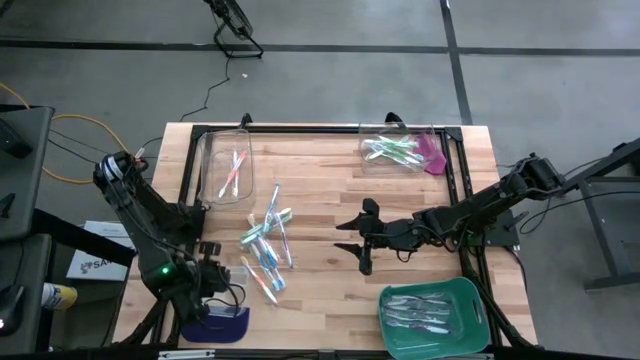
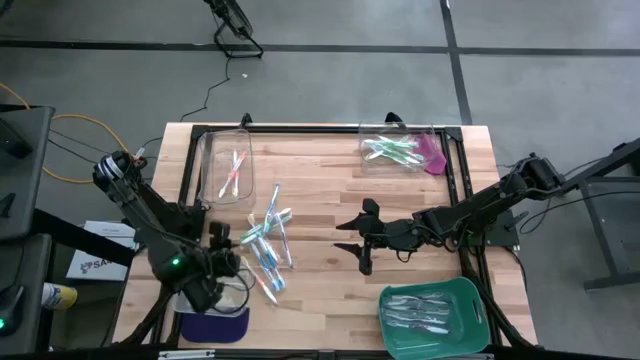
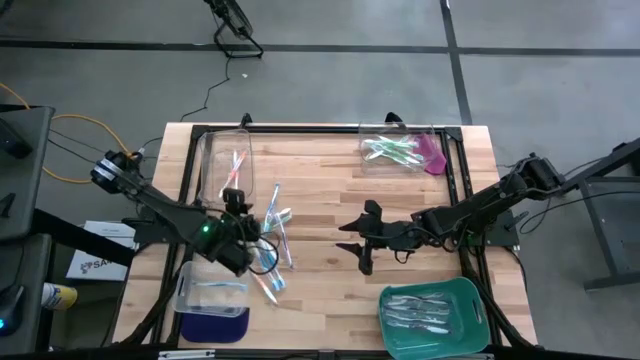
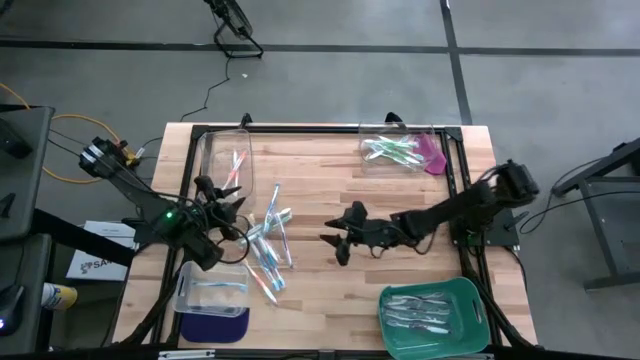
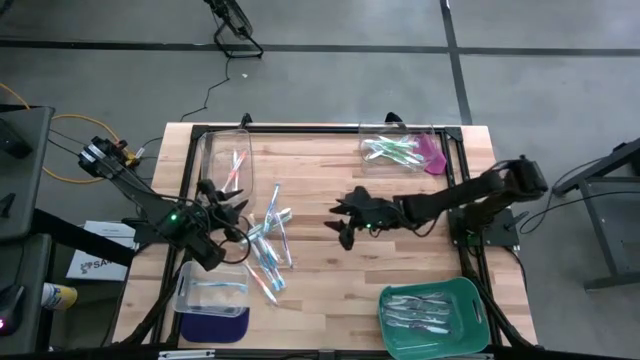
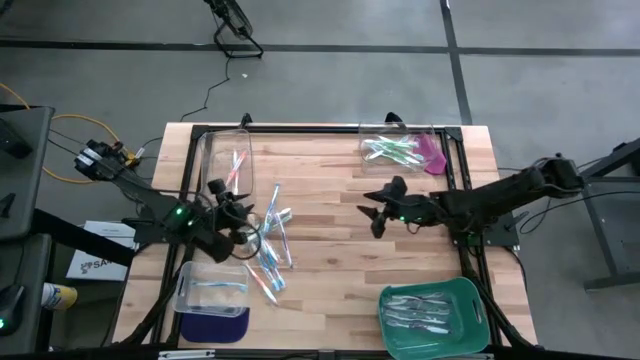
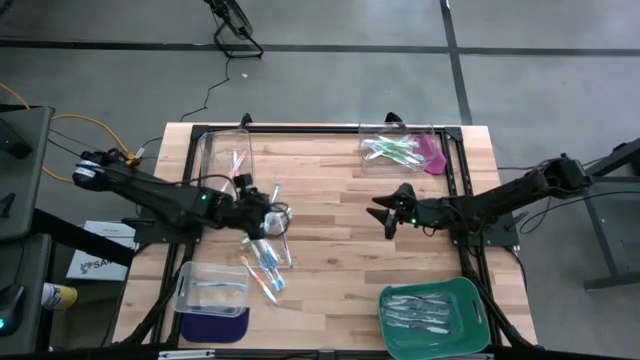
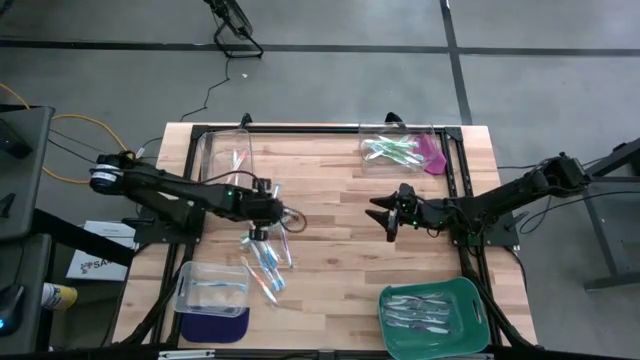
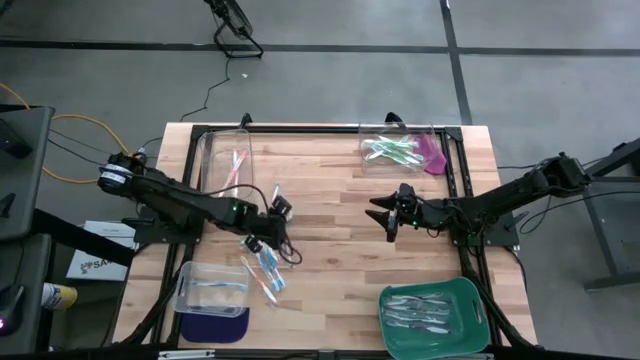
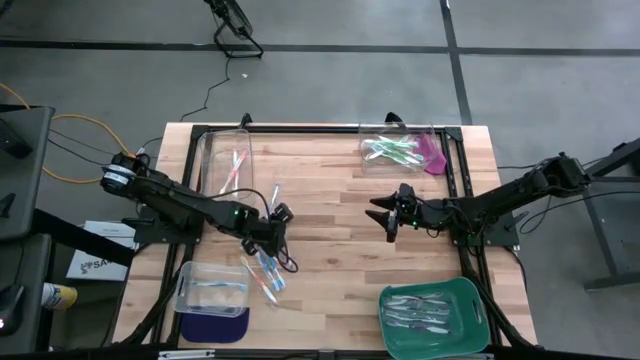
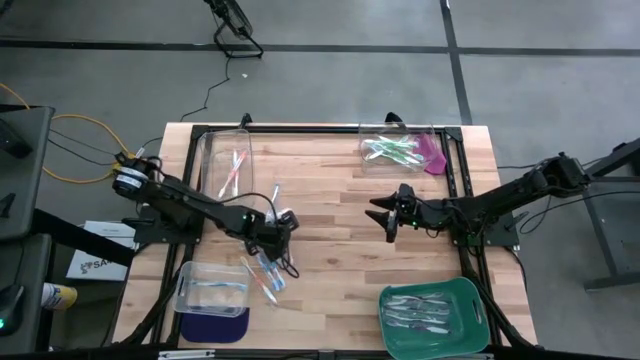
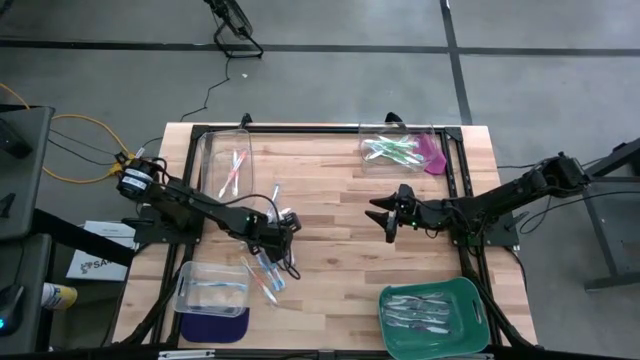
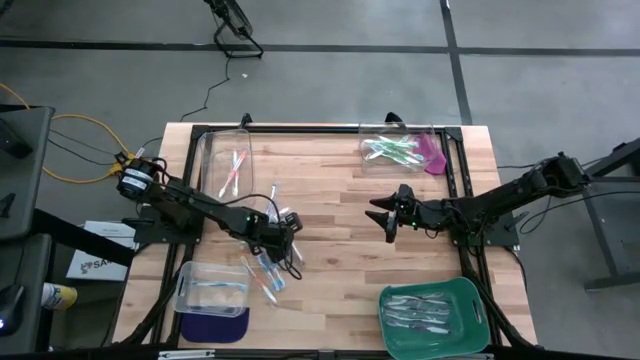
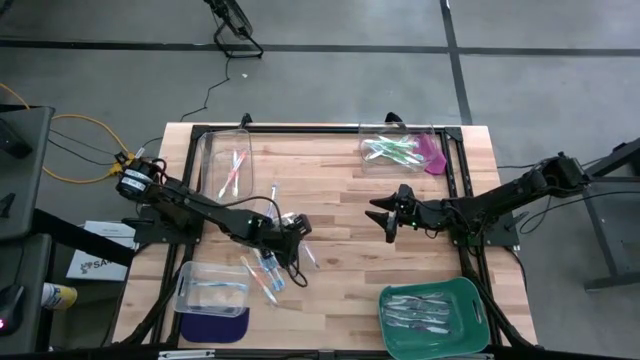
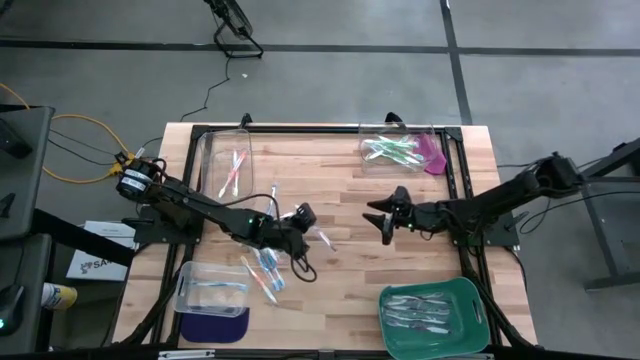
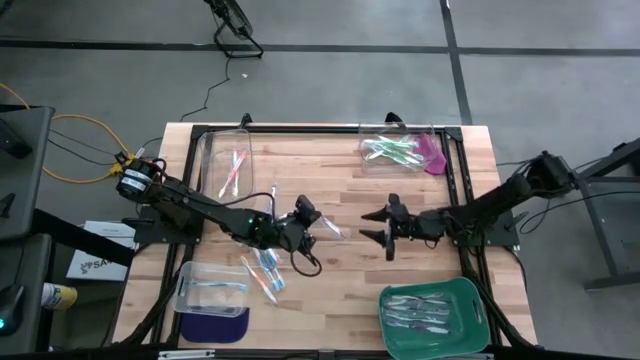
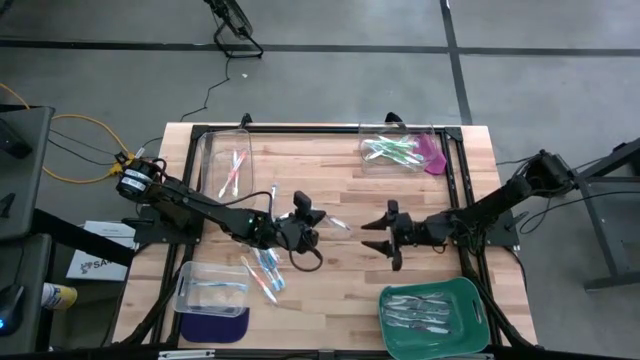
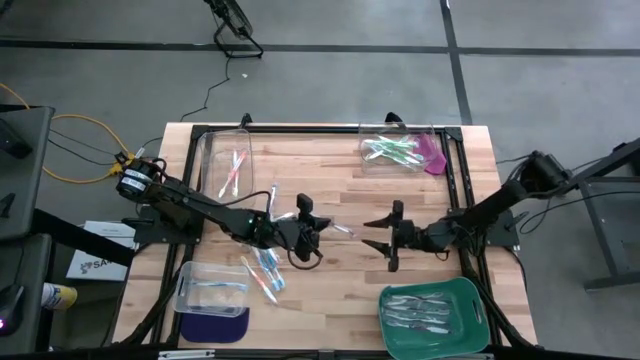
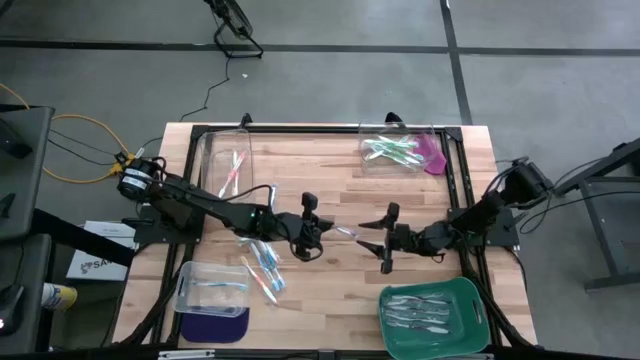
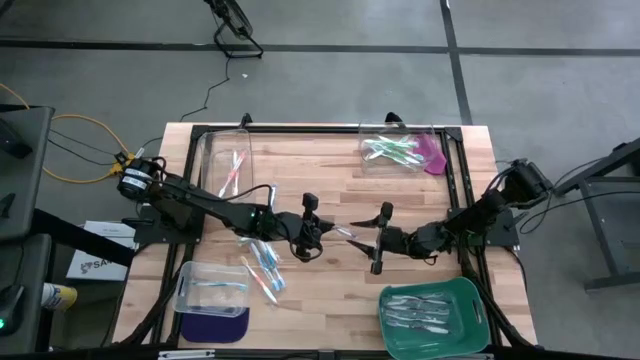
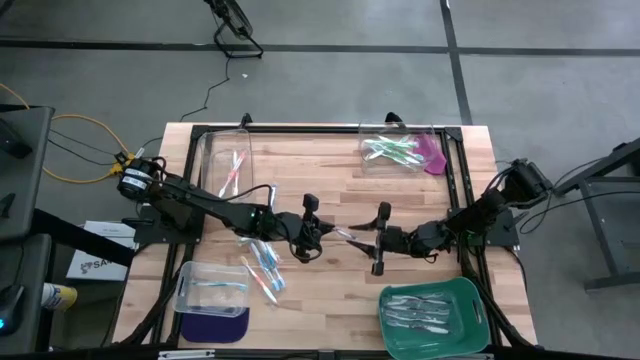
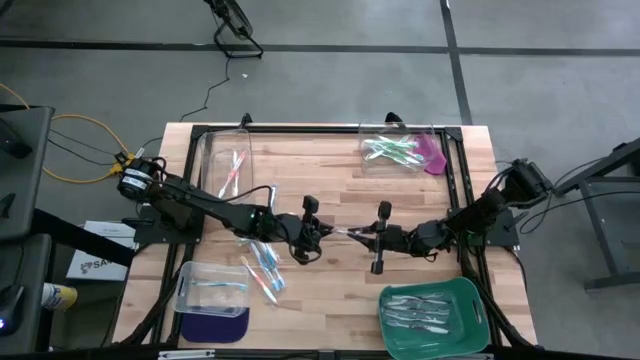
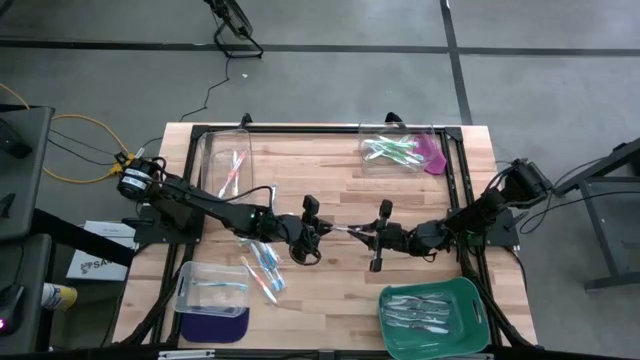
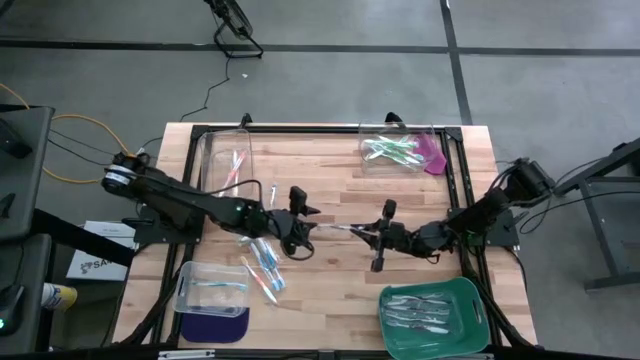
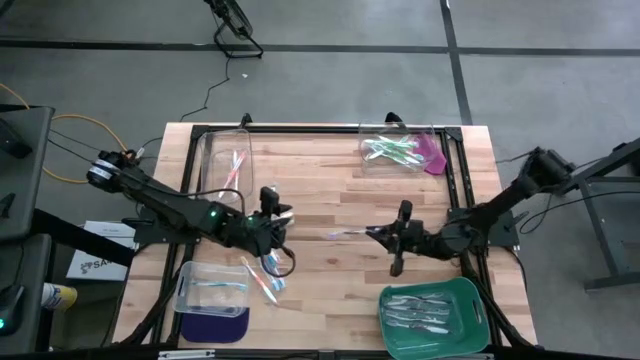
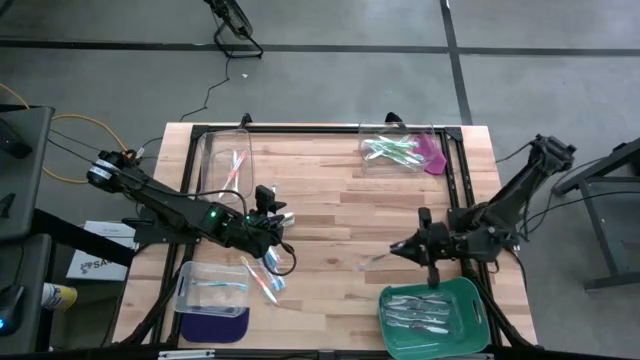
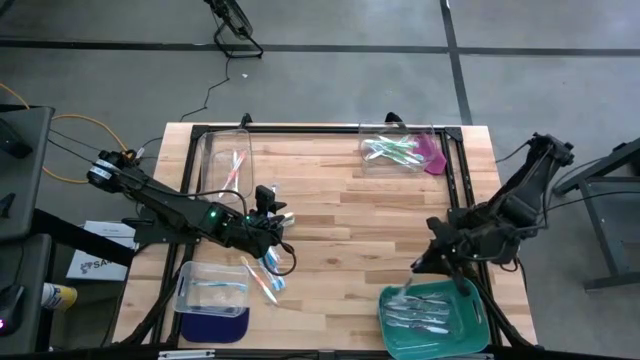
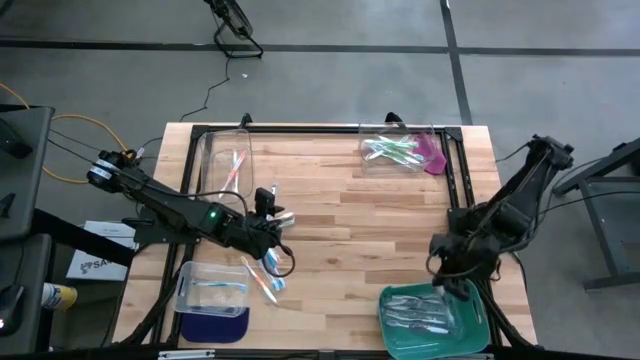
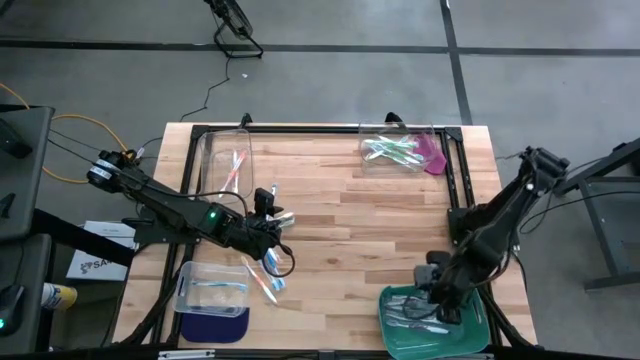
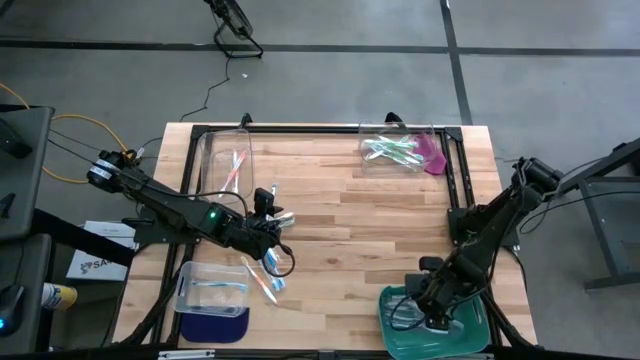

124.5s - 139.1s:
Task: Pick & Place Toothbrushes
Put the violet toothbrush into the green bin

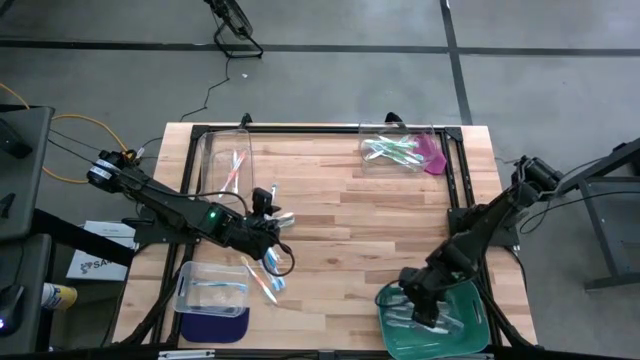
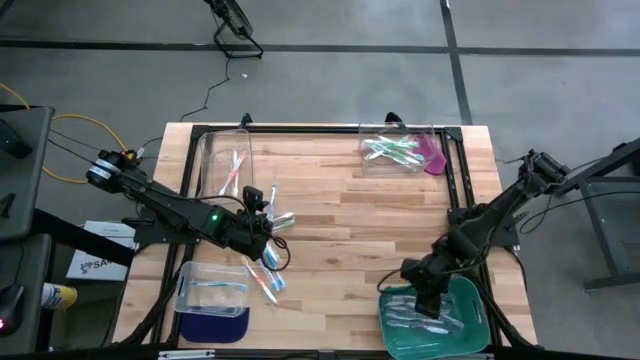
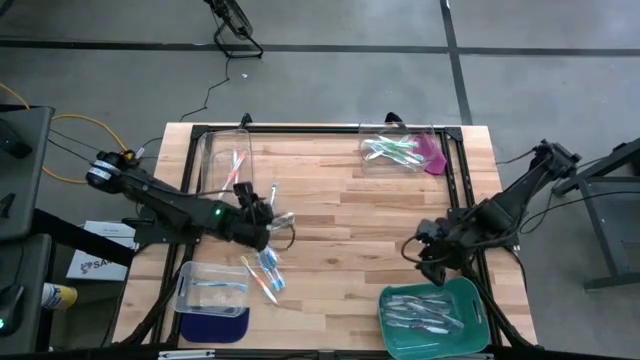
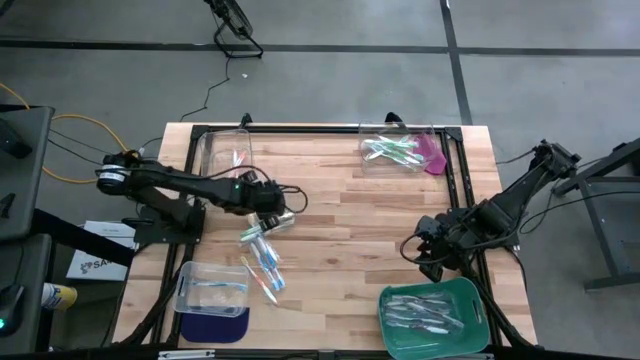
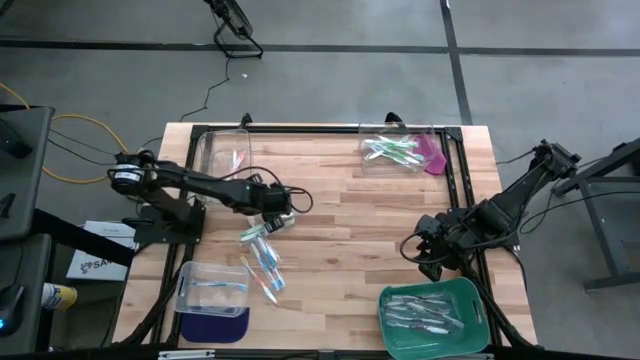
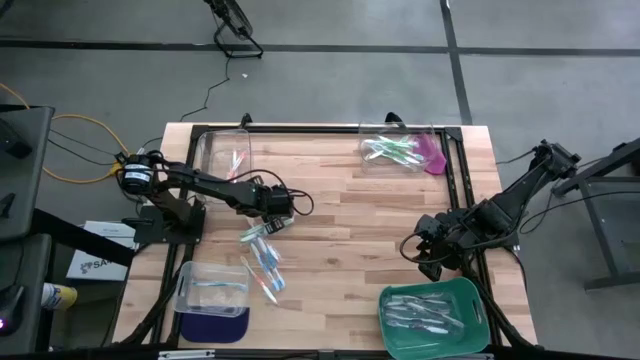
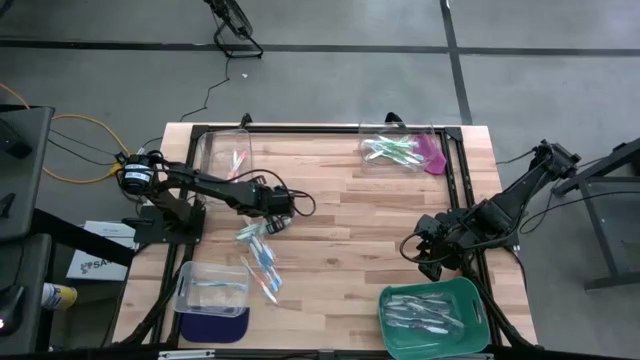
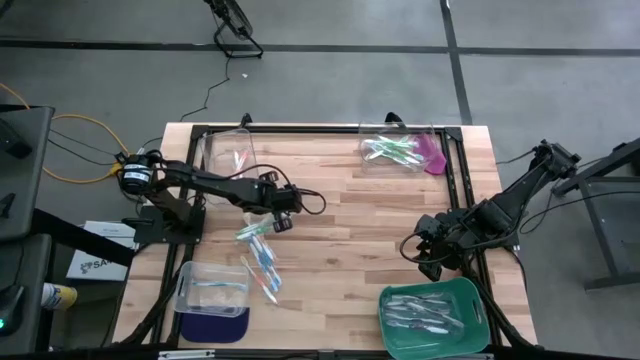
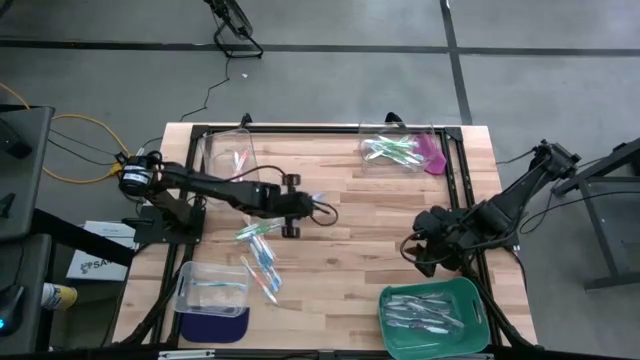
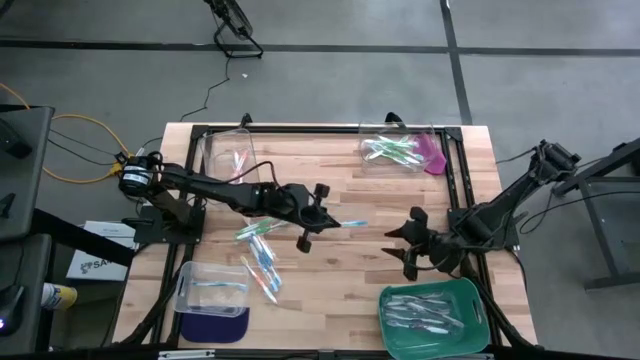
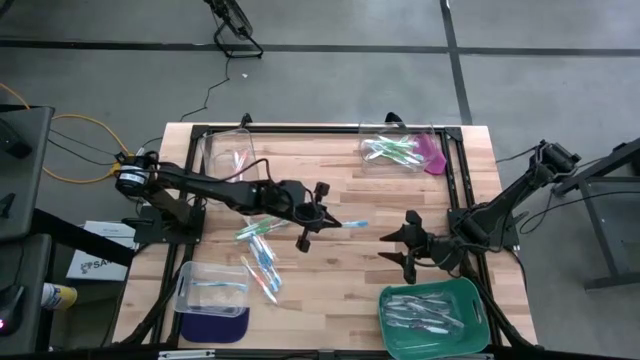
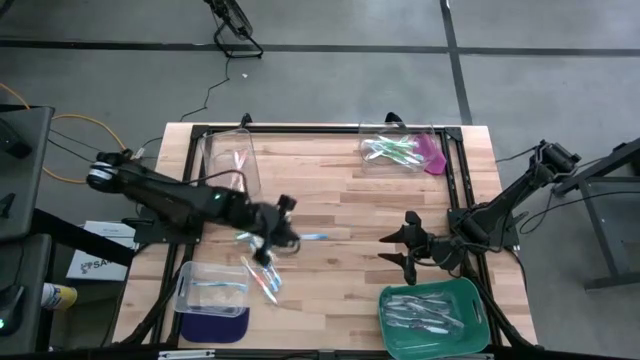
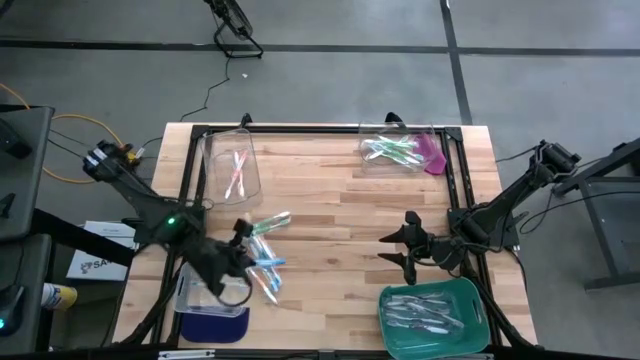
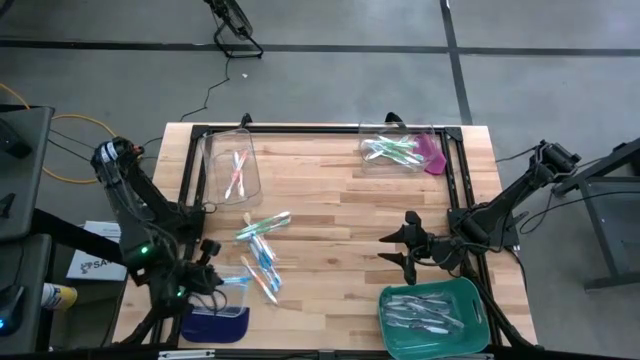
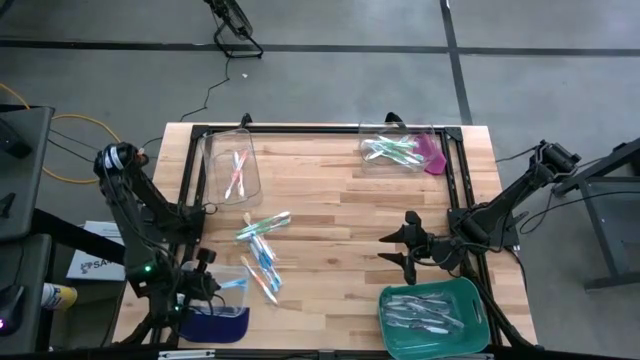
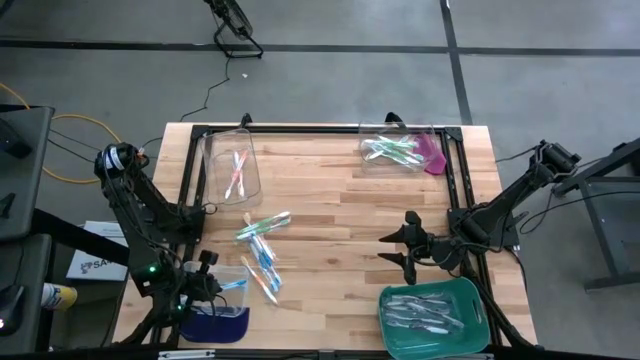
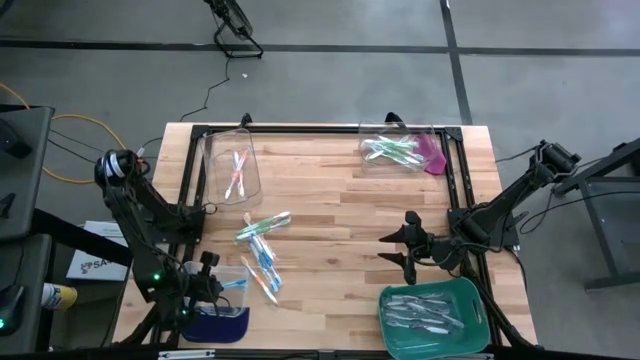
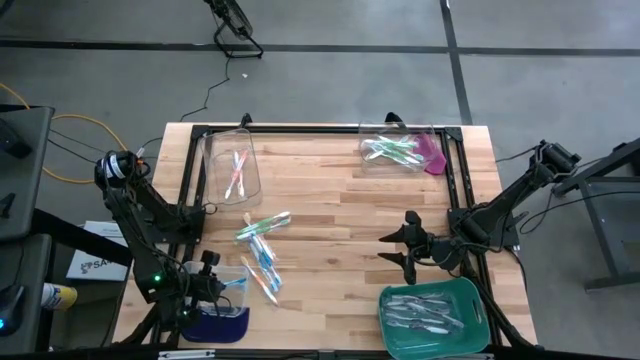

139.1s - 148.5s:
Put the blue toothbrush into the bottom transparent bin
